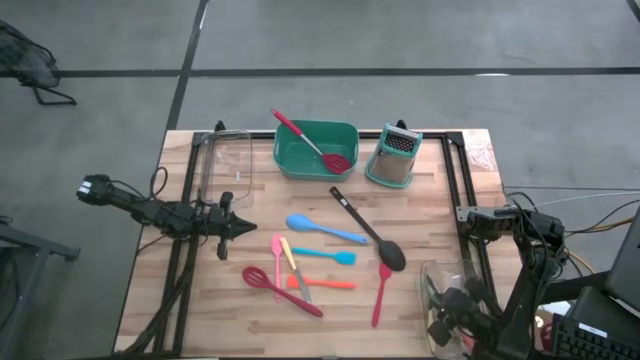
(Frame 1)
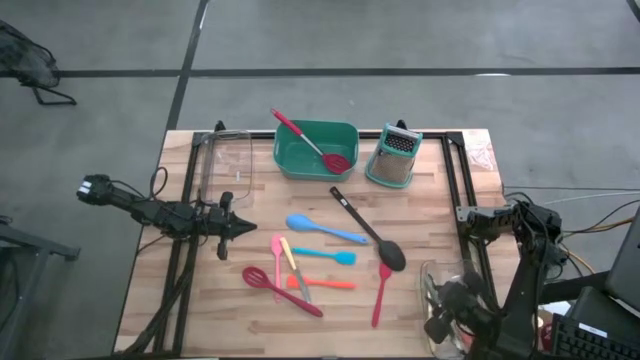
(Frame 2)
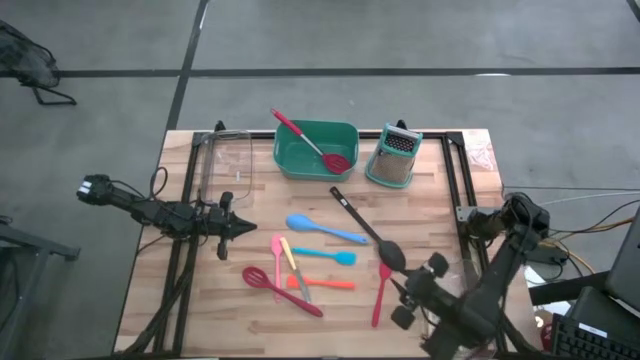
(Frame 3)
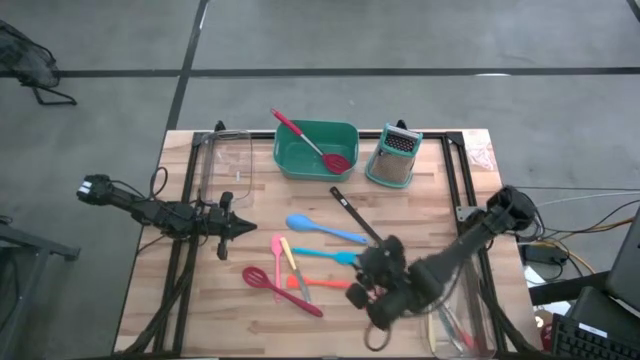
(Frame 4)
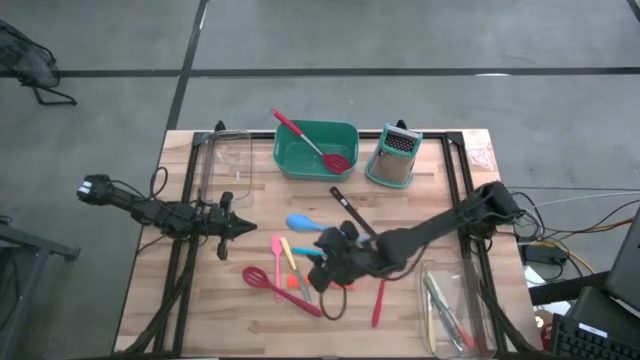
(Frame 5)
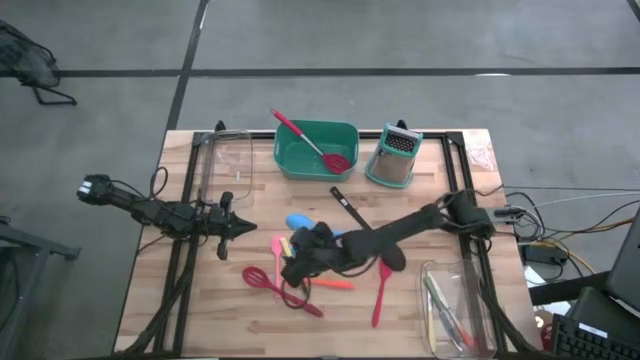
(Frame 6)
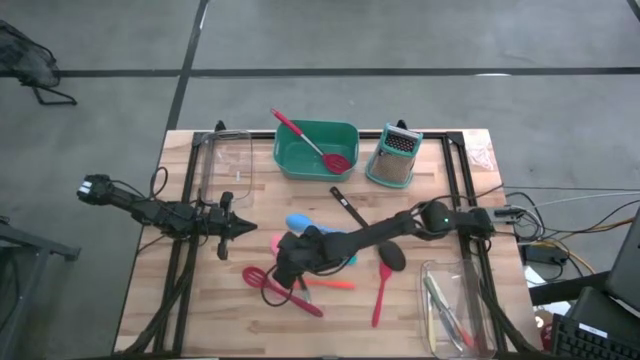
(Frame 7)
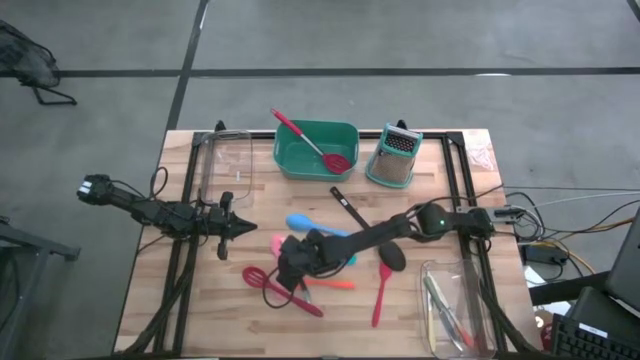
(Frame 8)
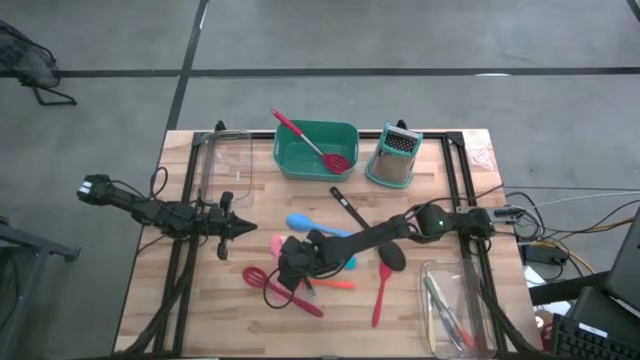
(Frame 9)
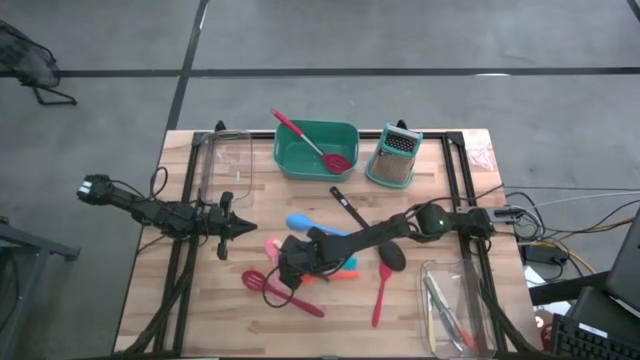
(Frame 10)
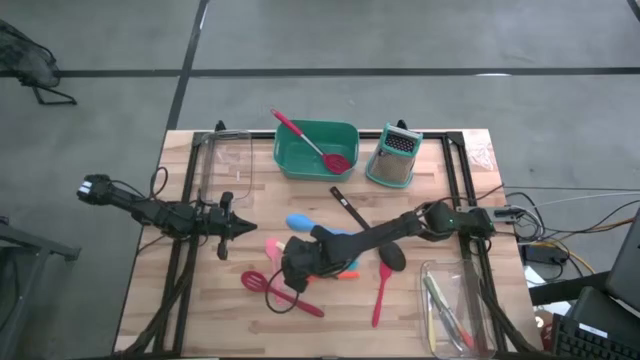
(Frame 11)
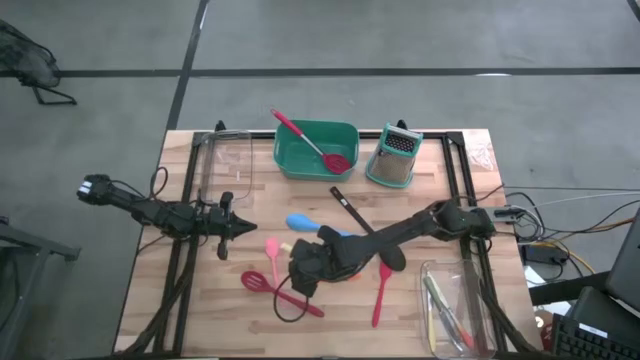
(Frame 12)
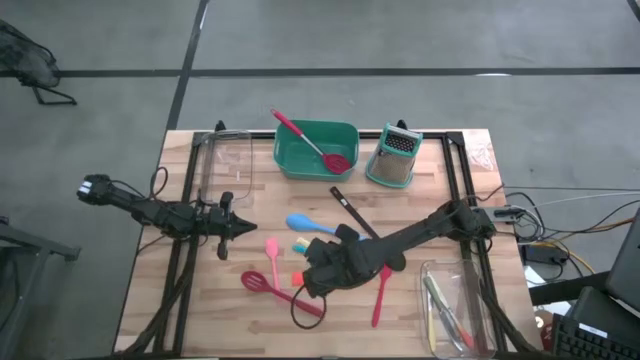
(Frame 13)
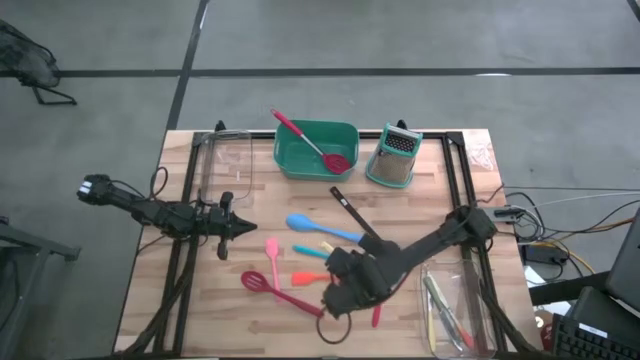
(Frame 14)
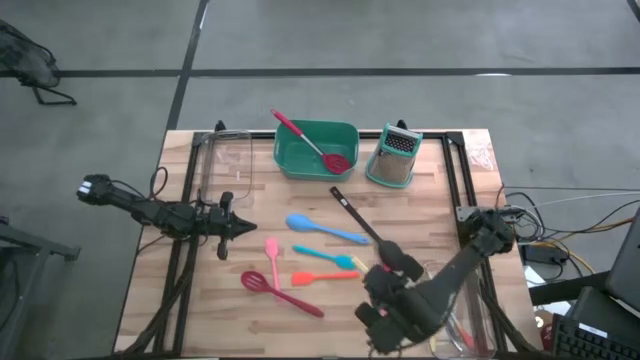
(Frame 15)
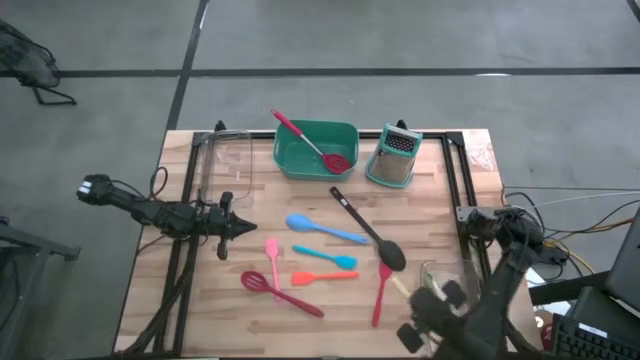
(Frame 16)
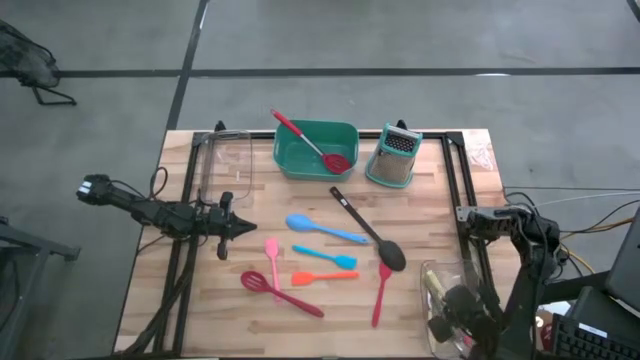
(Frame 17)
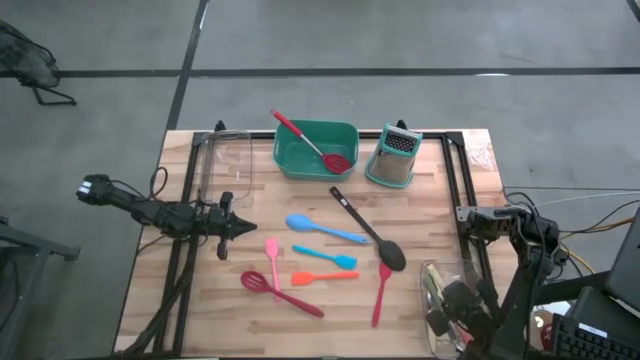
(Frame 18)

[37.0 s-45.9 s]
Task: Pick & Place Kitchen Items
Put the yellow knife into the bottom right transparent bin

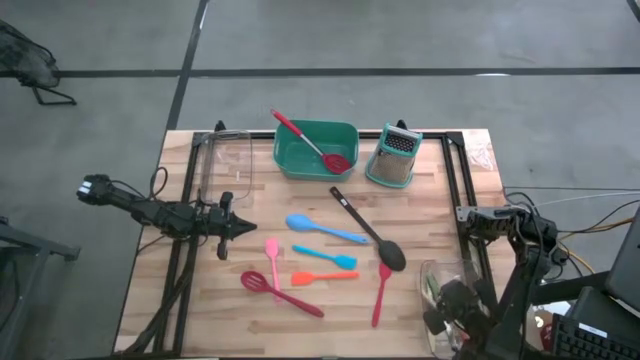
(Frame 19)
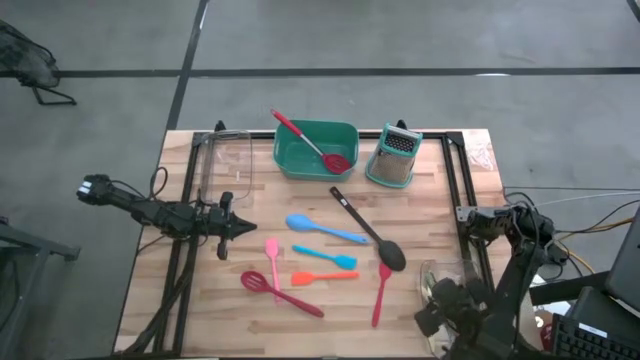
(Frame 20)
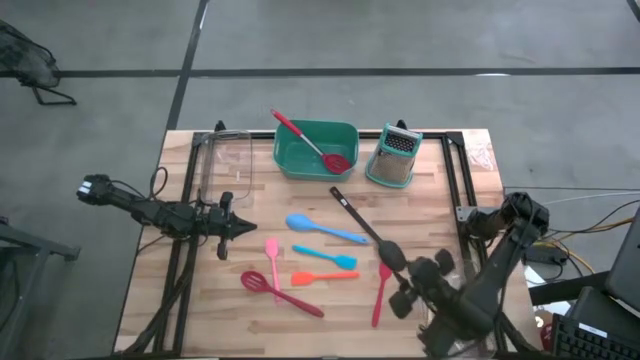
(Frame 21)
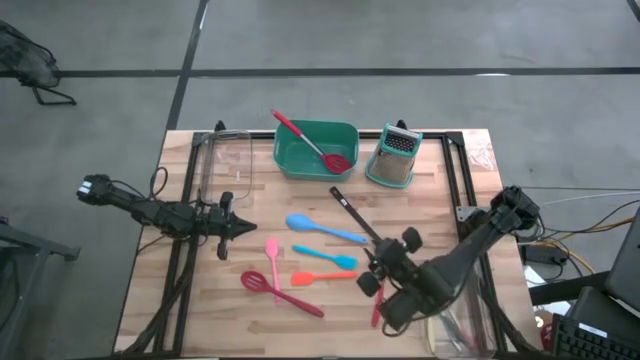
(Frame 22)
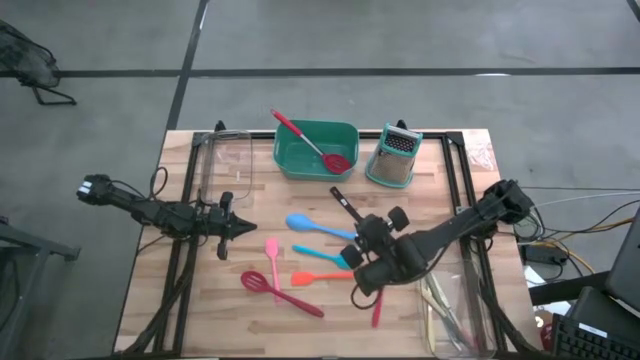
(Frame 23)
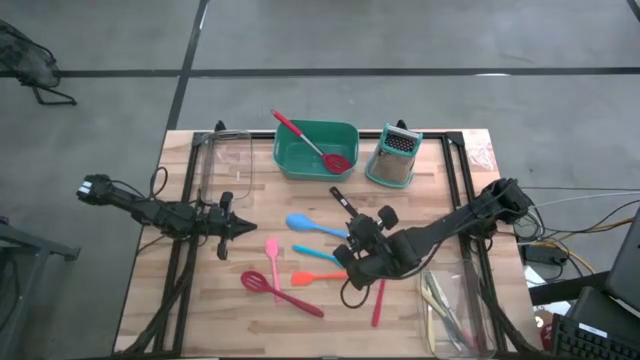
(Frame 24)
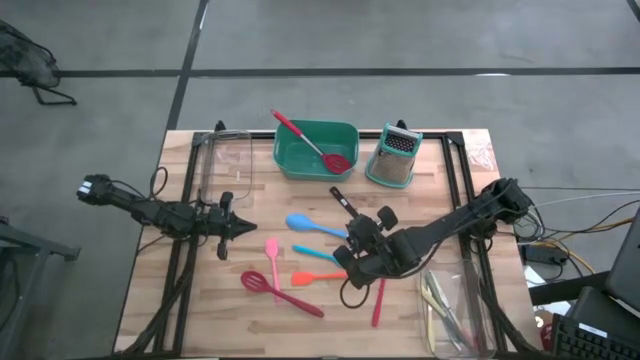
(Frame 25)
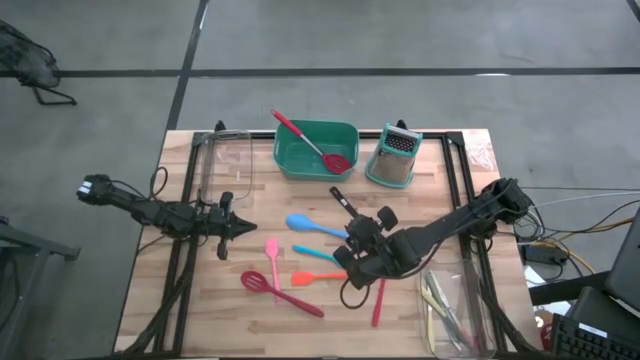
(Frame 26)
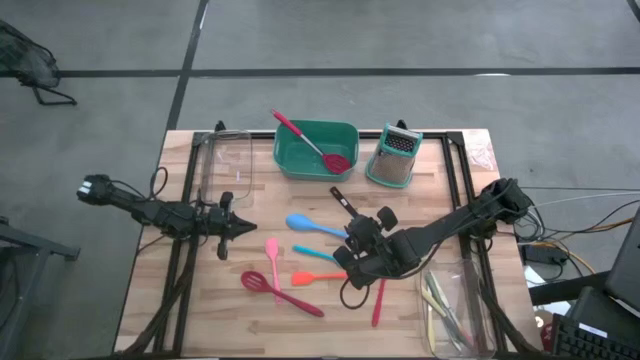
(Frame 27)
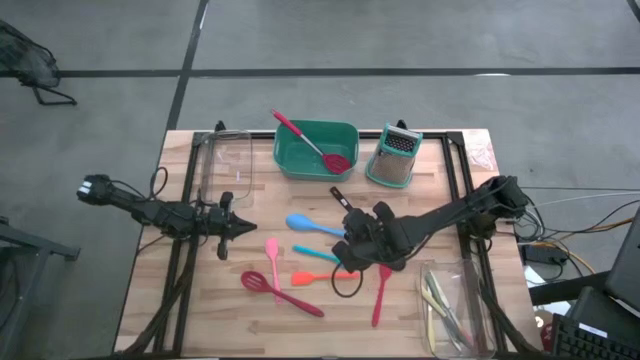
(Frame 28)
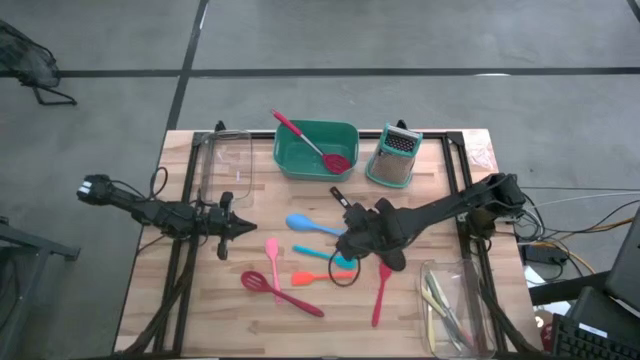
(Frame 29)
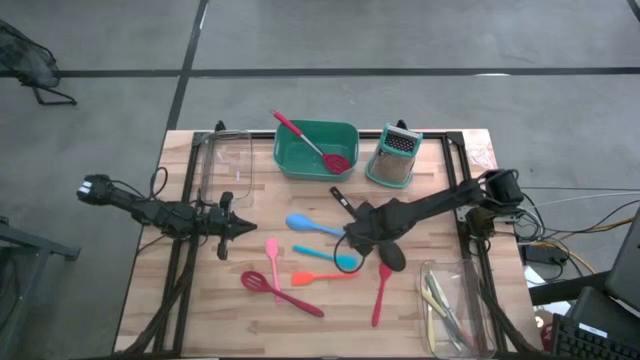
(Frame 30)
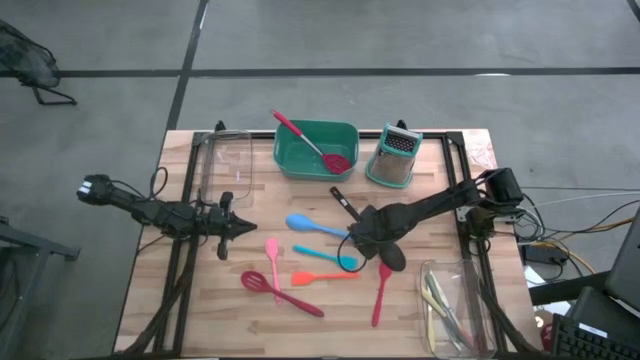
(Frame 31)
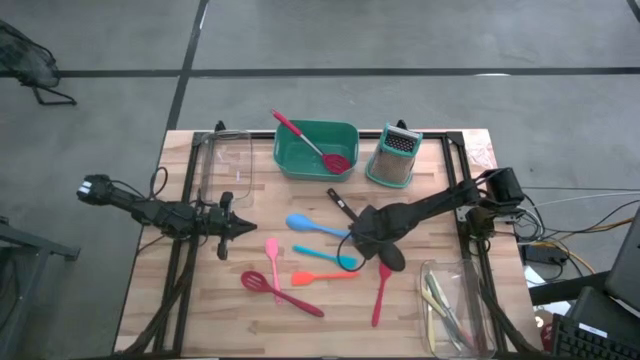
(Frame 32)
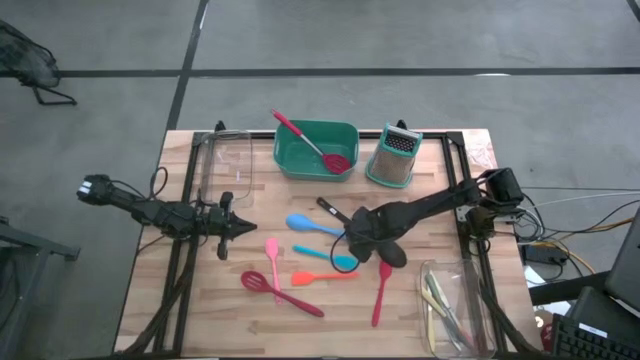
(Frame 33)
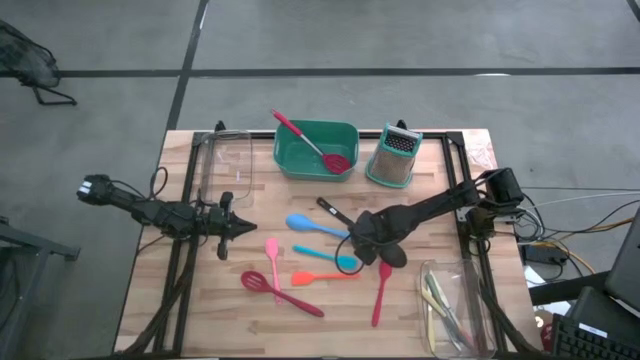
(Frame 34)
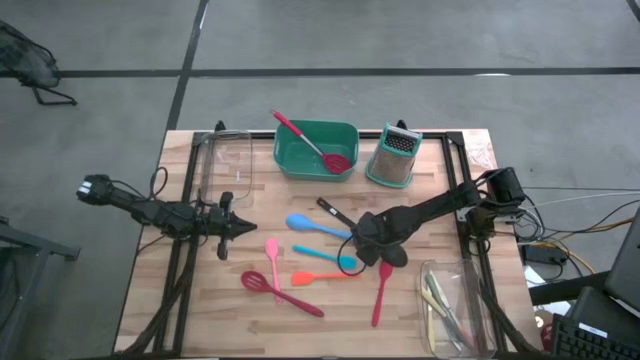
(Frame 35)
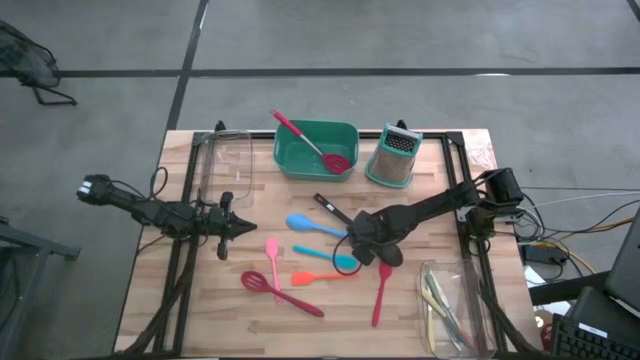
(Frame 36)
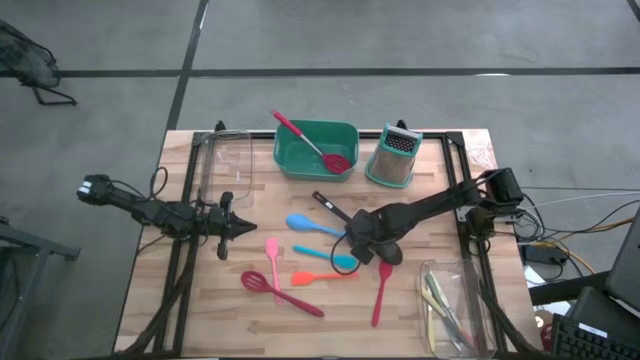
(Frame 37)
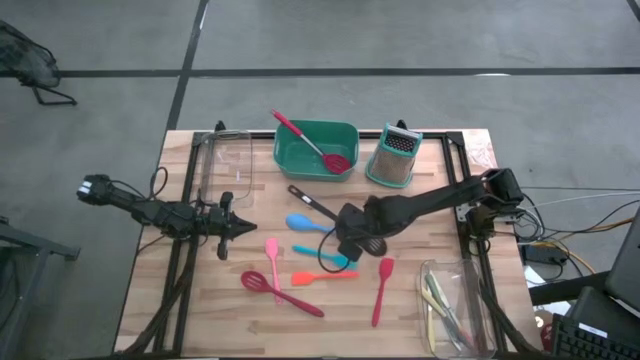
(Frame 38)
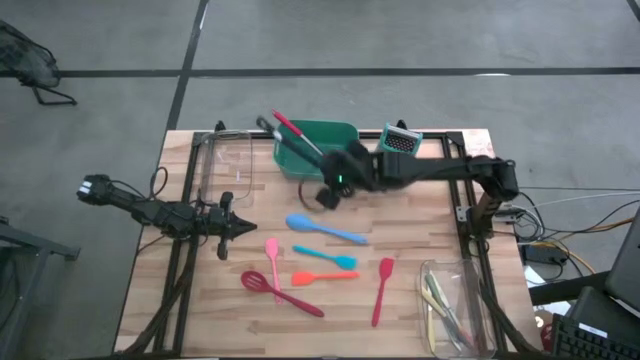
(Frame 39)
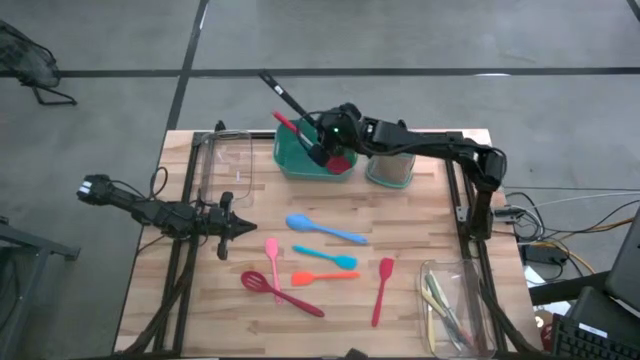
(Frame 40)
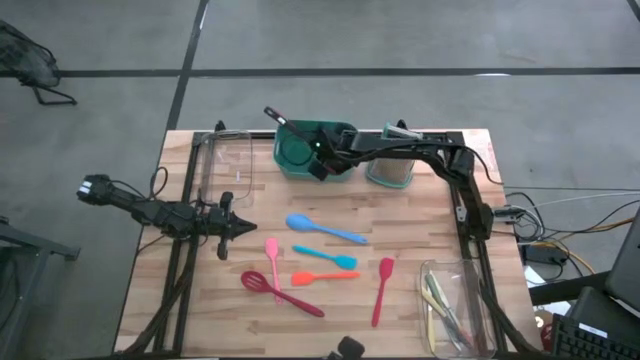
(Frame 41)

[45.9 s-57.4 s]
Put the black serving spoon into the green bin

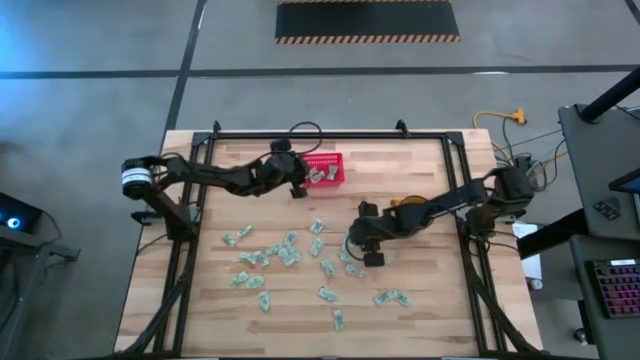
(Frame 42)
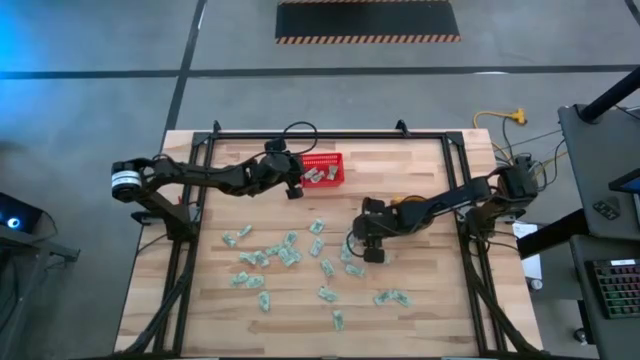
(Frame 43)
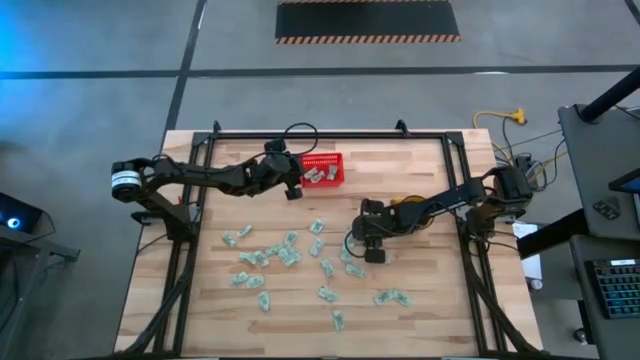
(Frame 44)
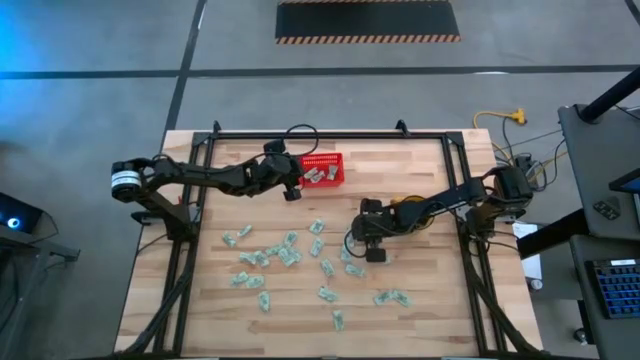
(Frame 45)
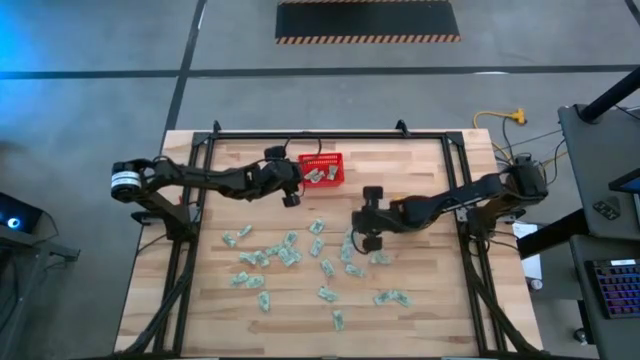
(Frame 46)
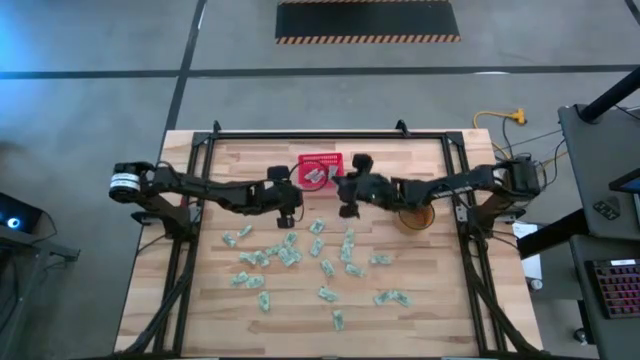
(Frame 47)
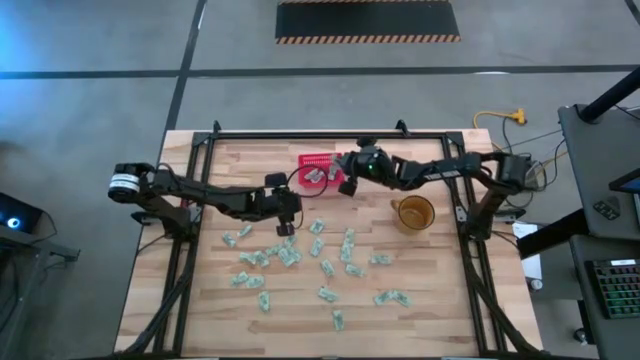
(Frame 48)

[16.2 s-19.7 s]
Task: Pick and place Stevia / Truvia into bins
Put the white stevia packet into the red bin
